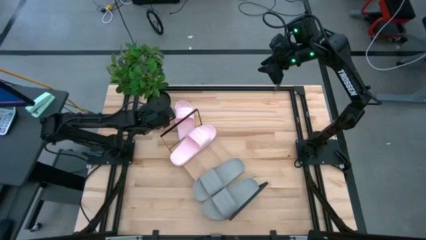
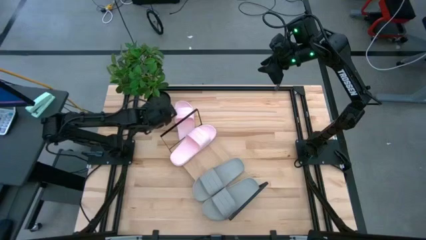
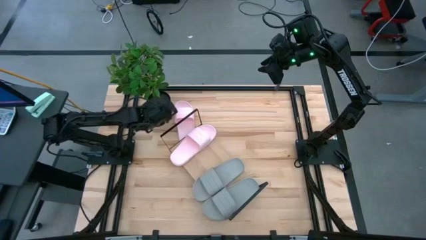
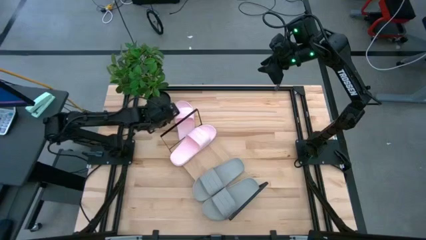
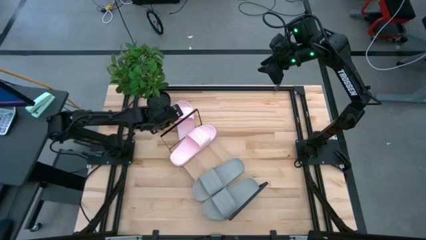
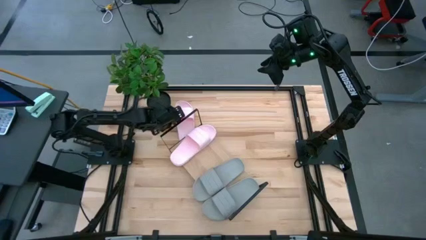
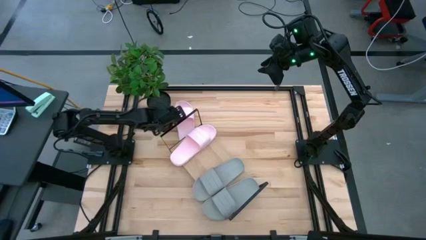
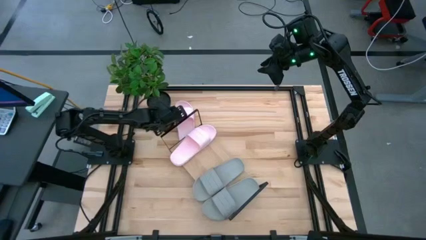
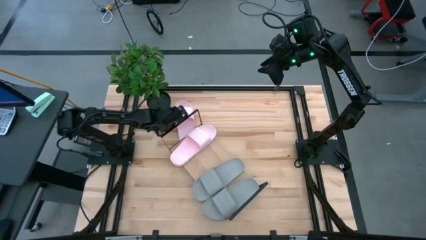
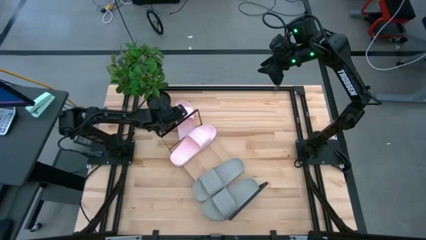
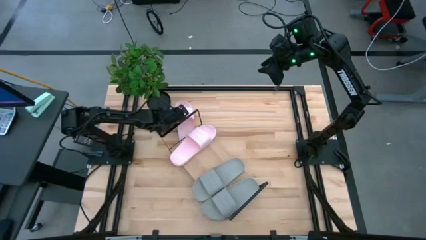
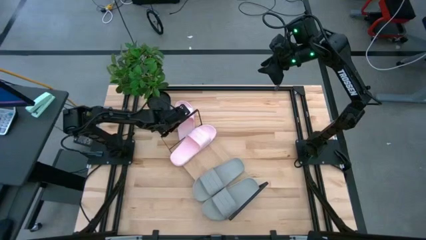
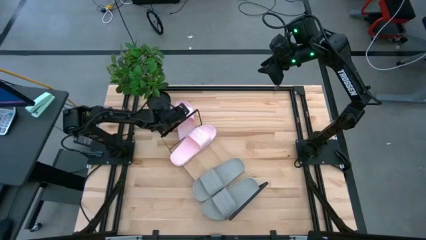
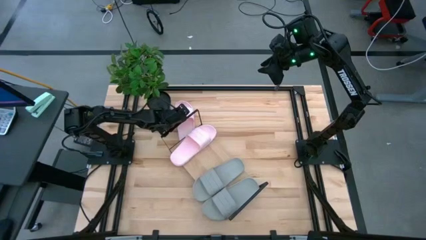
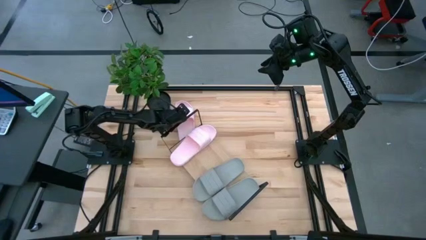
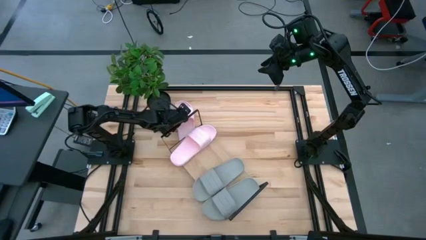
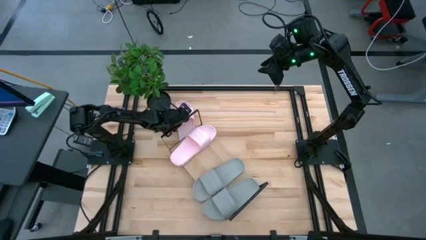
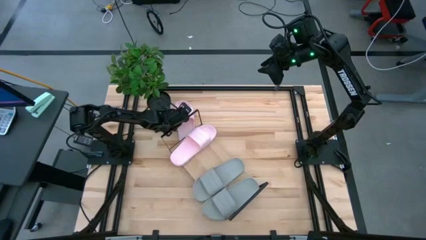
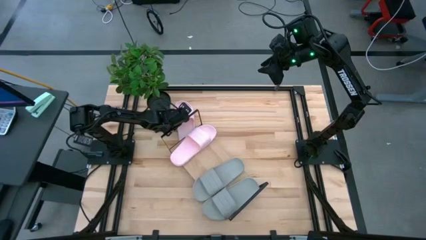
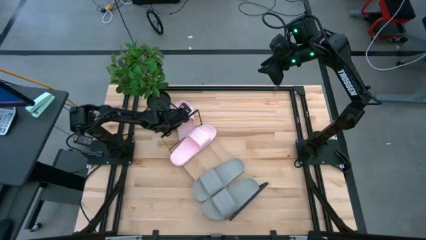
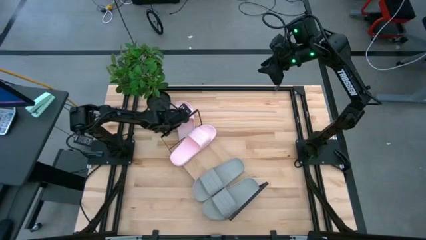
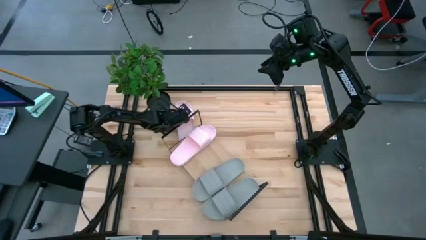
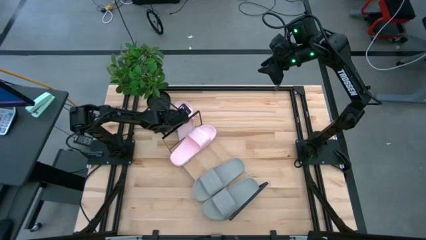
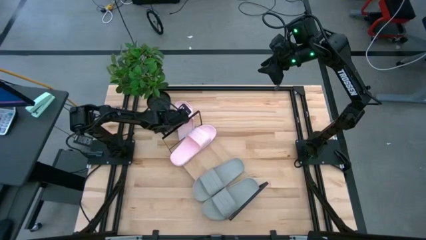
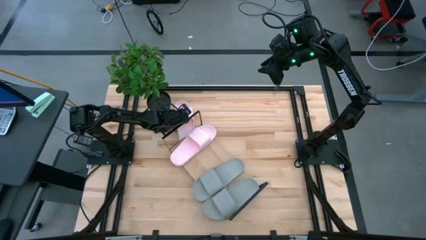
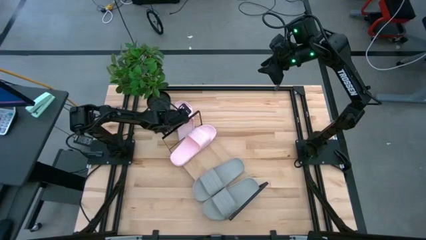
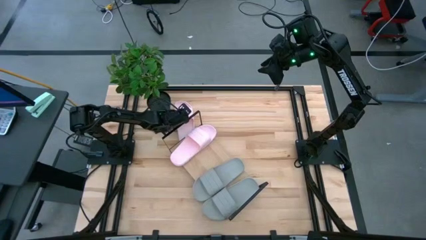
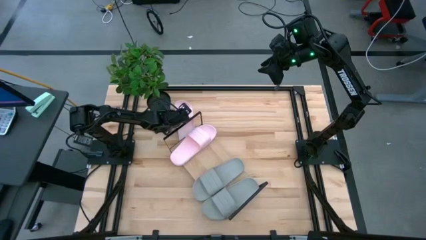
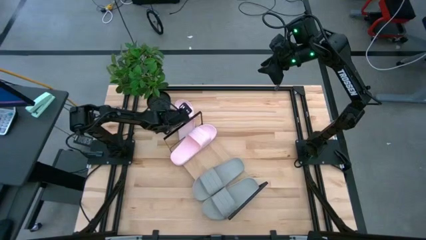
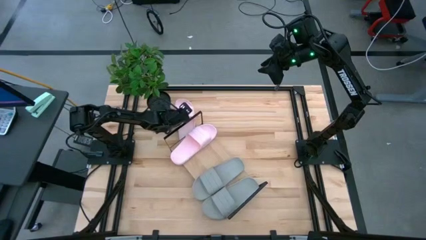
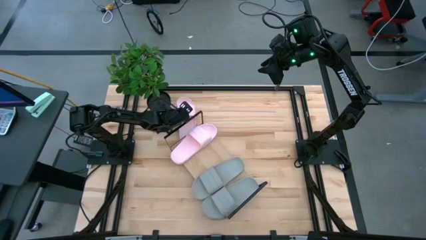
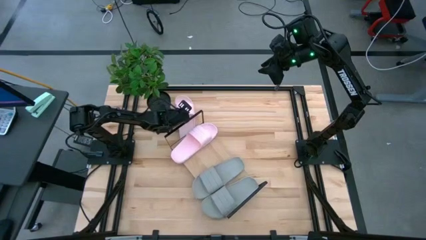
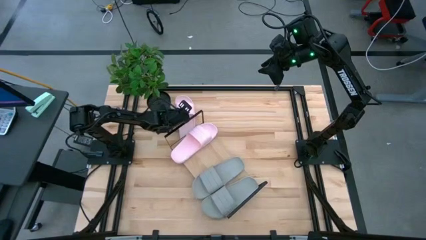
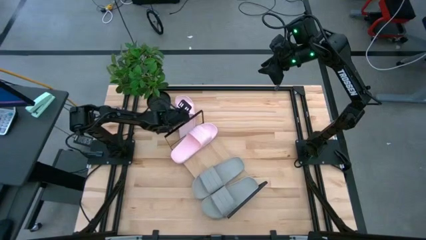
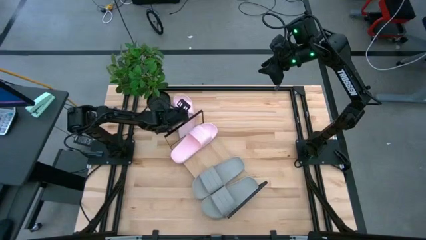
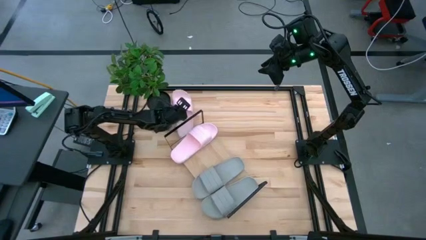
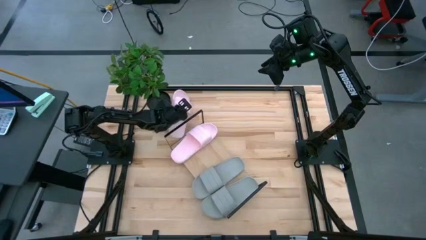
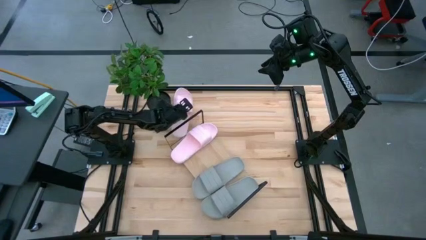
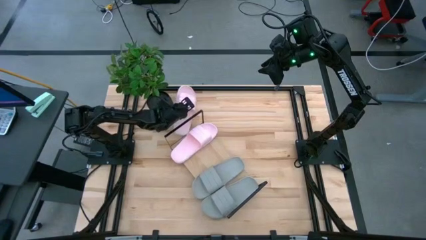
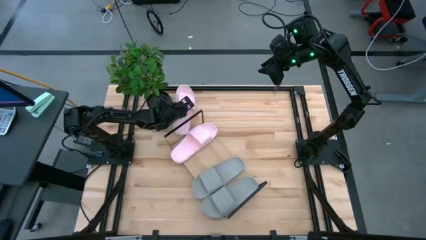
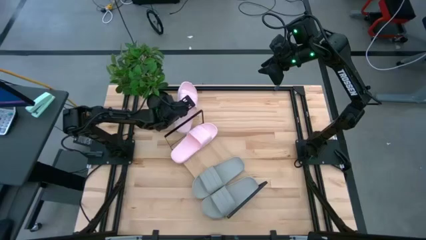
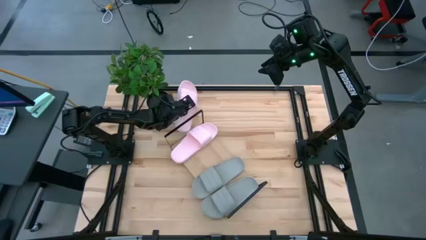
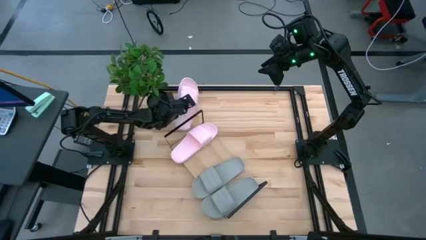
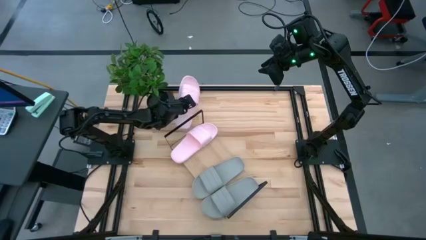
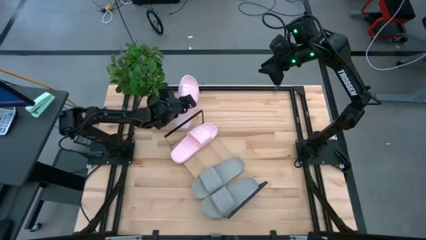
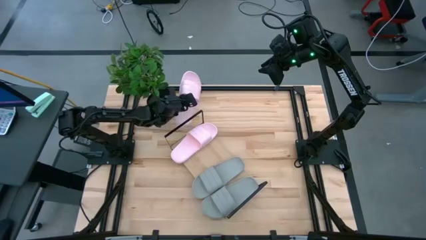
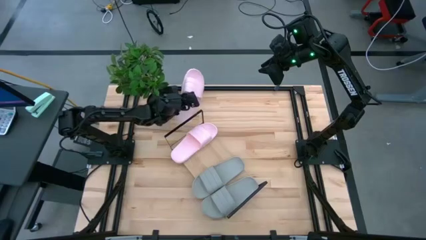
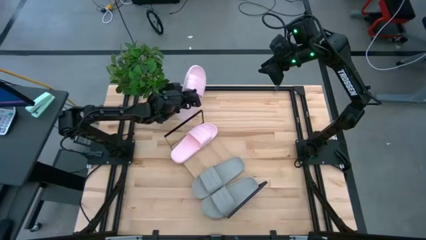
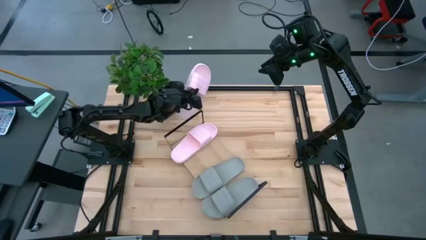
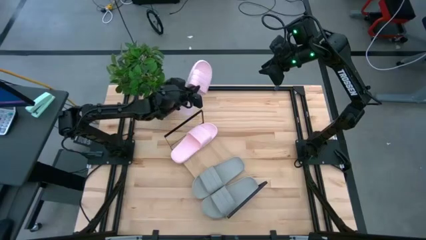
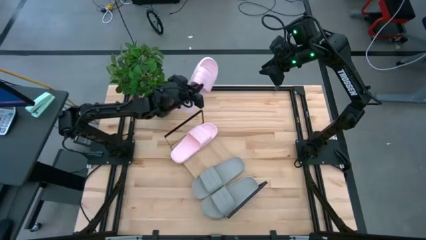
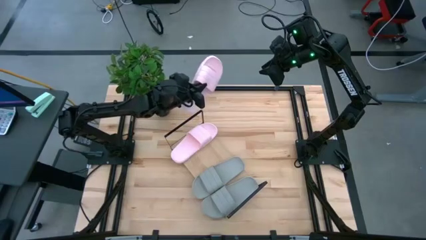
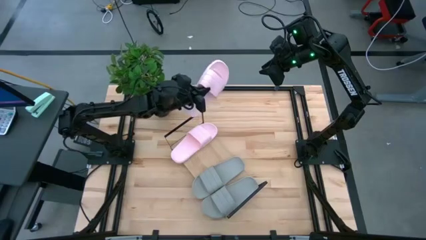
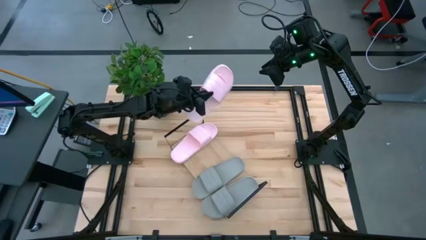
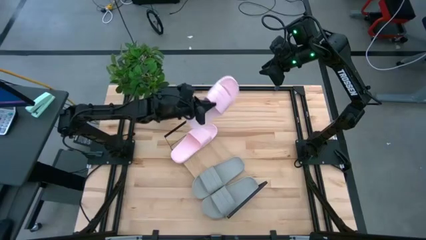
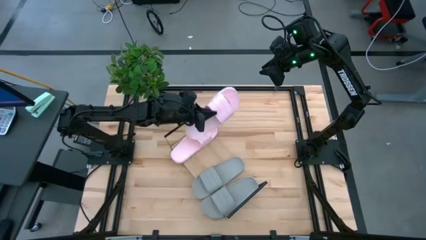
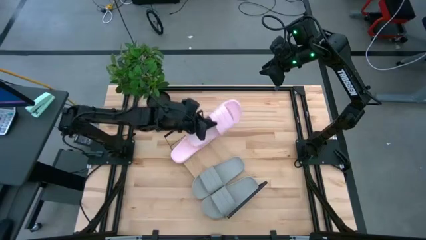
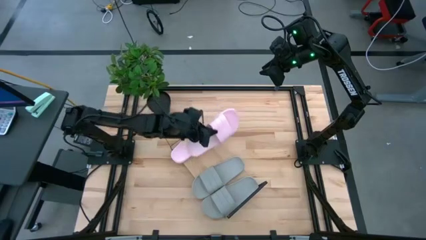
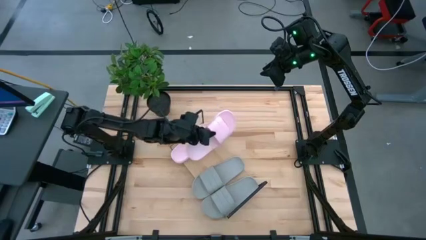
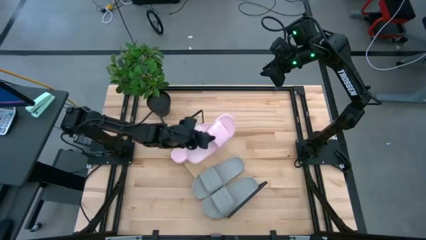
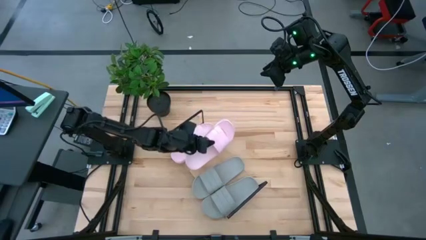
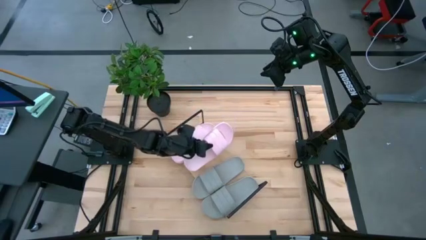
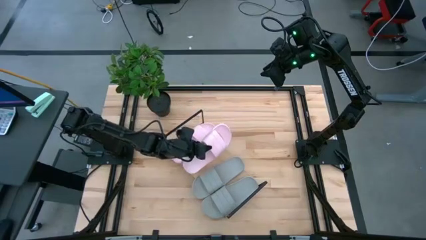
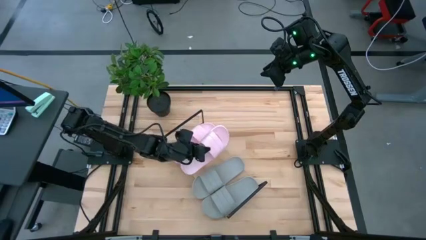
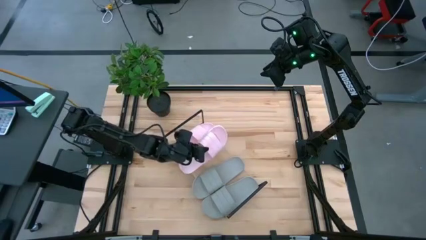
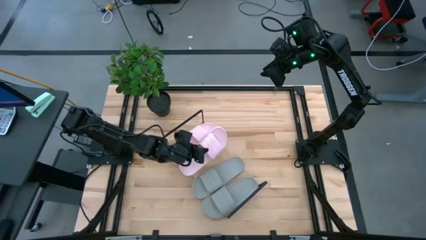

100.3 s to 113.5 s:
Task: Pick and place slides into the shelf
Put the pink slide on the shelf
